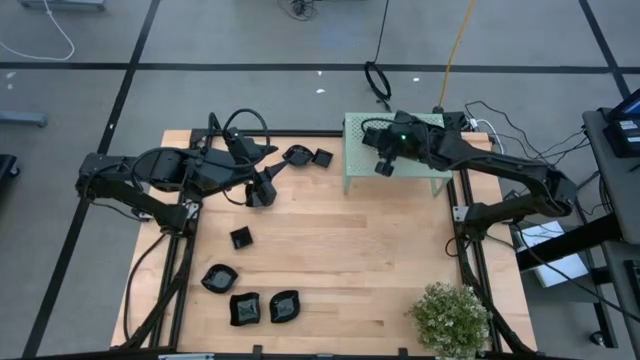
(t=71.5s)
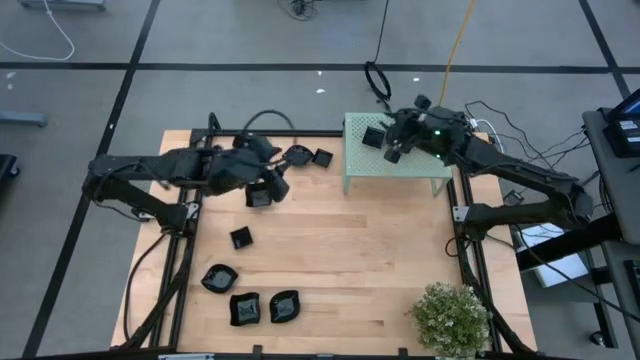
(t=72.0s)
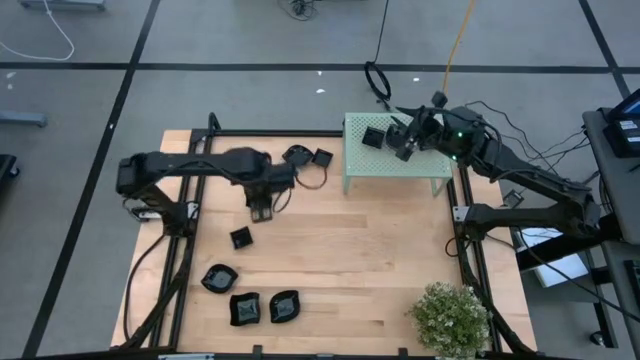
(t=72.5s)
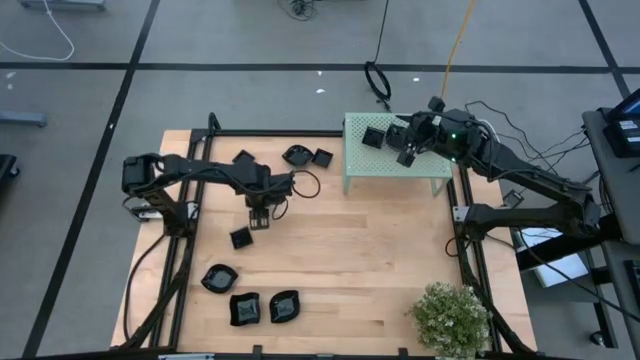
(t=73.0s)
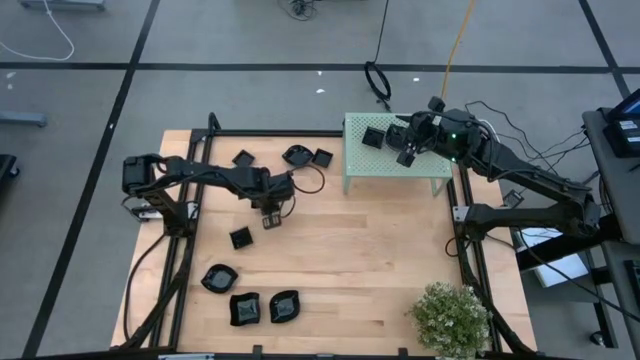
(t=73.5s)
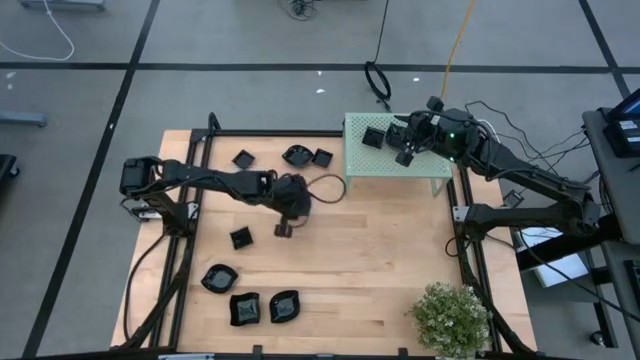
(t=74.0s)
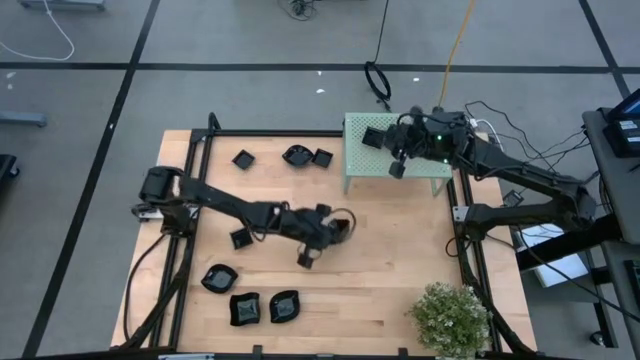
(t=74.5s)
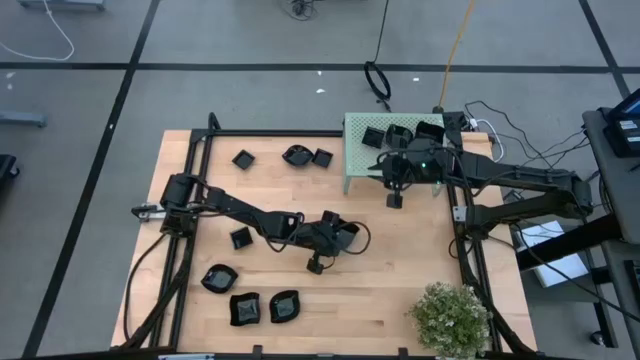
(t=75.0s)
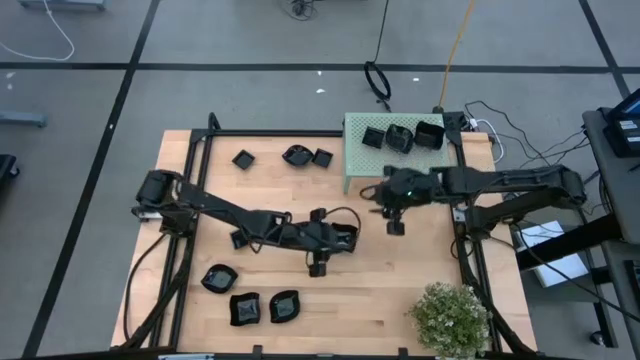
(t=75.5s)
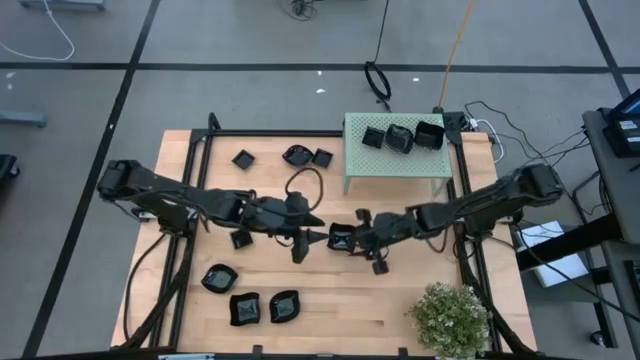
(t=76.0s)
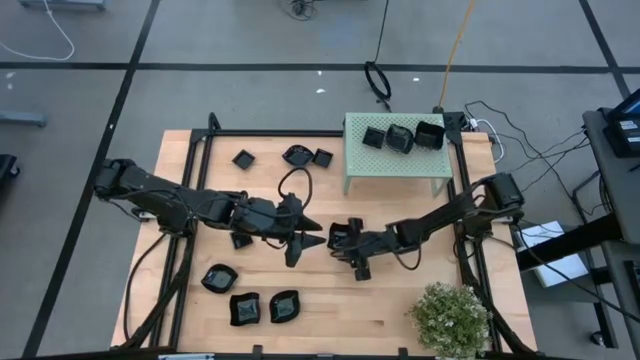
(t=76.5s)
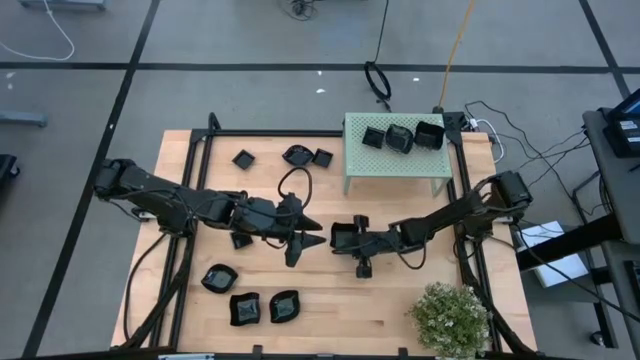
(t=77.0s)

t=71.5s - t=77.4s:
Task: Pick & Place Mini shaped plates
Stack the top distorted square plate on top of the distorted square plate on the shelf

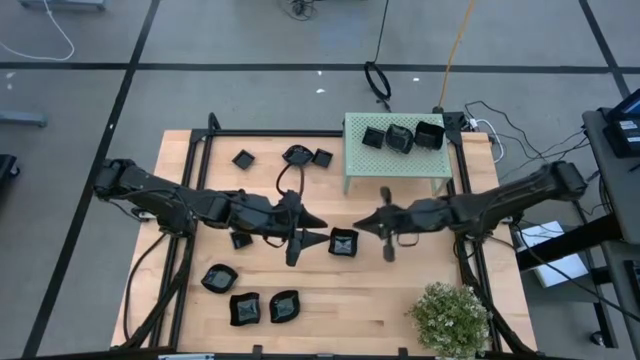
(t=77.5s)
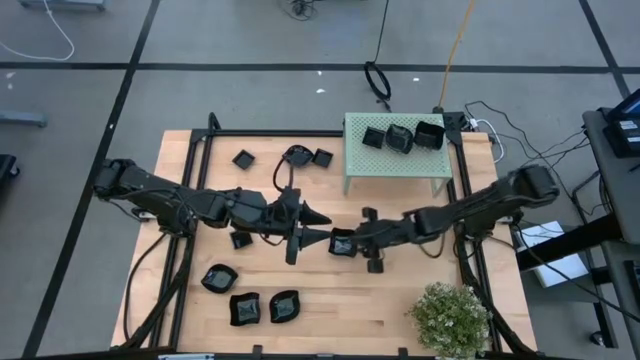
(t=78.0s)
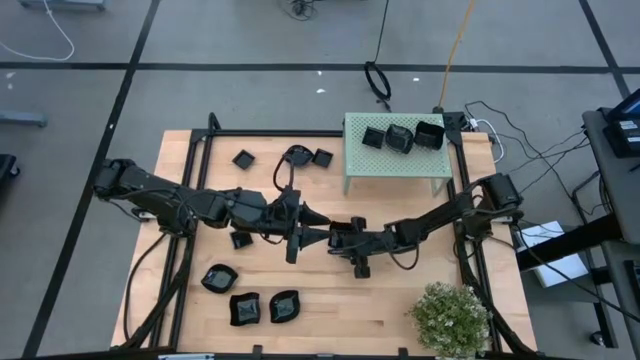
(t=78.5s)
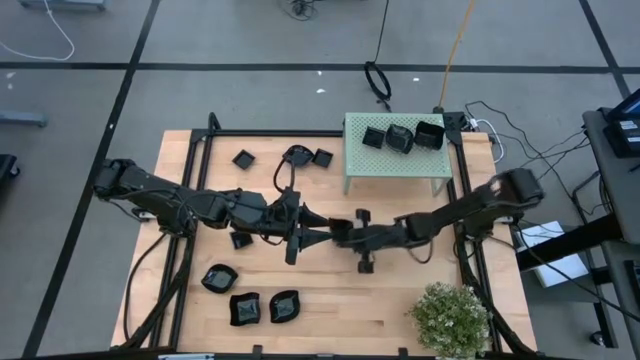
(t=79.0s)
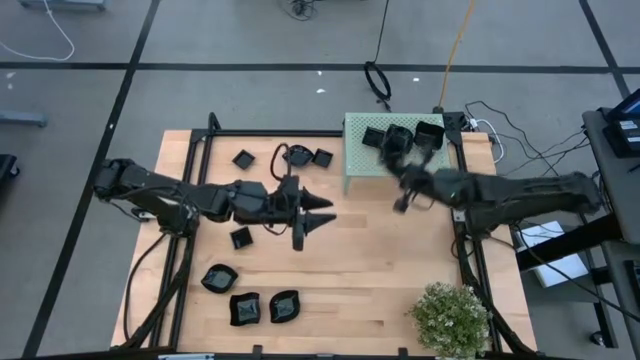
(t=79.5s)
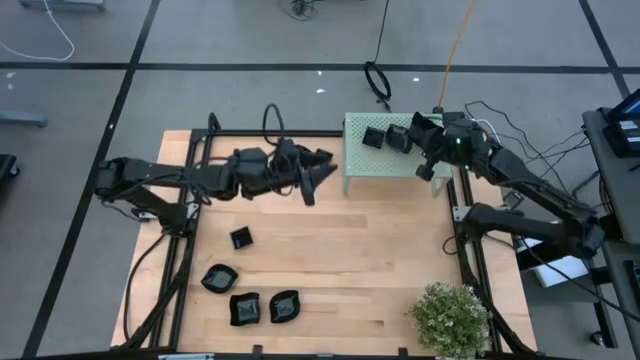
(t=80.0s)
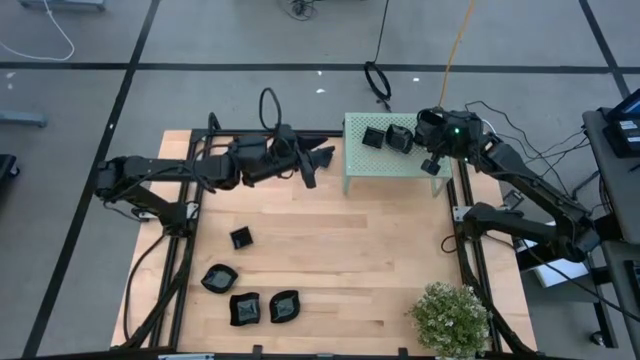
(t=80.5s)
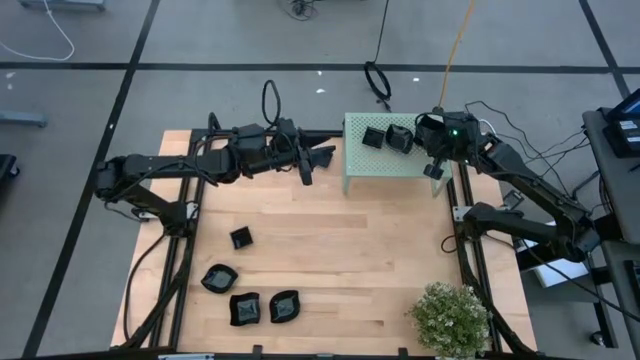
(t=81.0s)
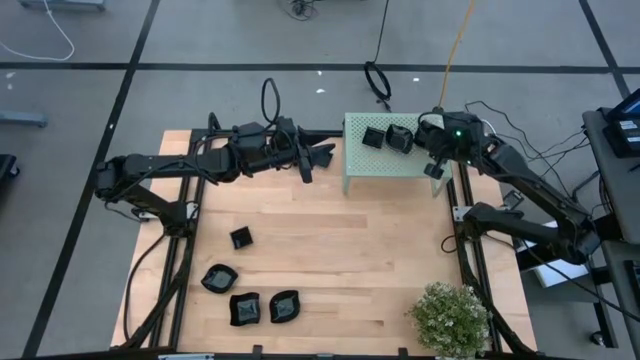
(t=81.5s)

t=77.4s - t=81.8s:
Stack the top distorted square plate on top of the distorted square plate on the shelf

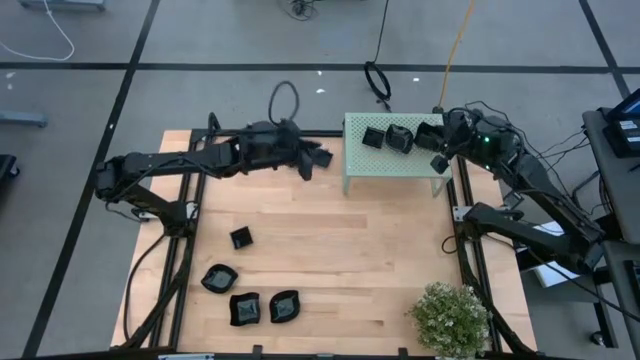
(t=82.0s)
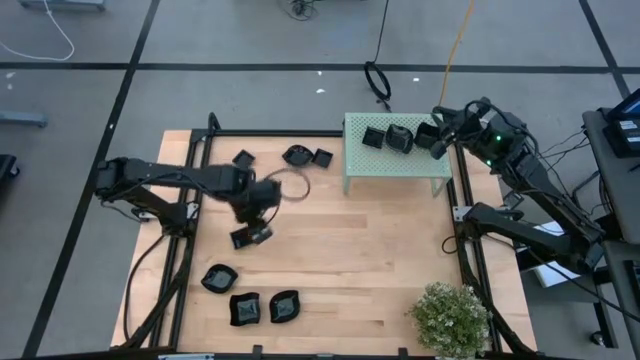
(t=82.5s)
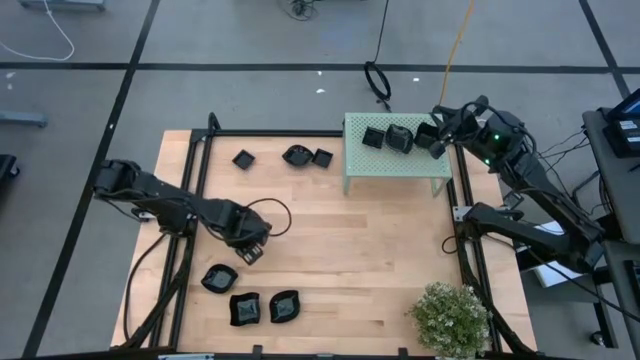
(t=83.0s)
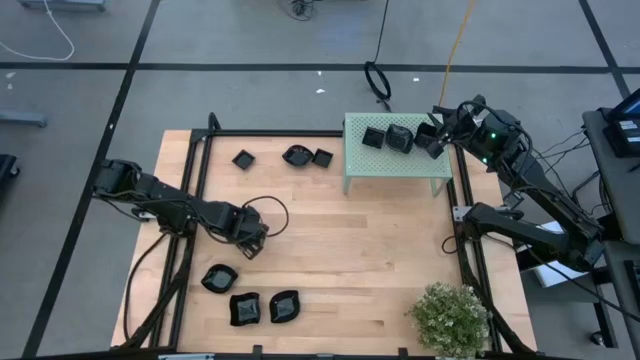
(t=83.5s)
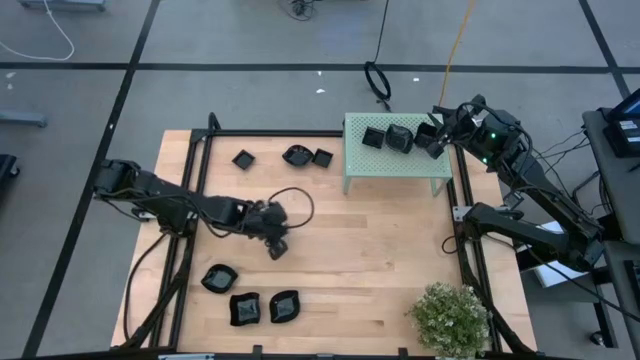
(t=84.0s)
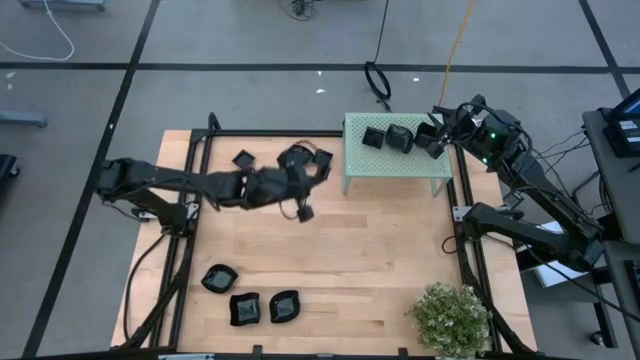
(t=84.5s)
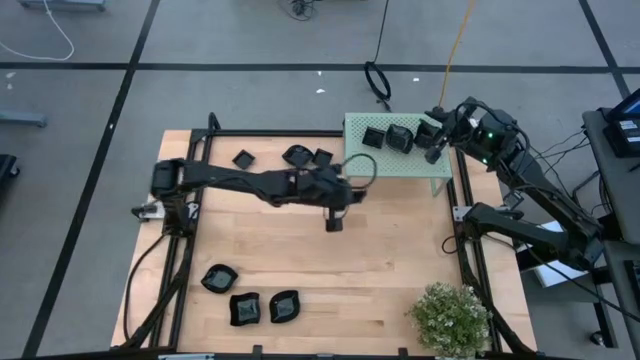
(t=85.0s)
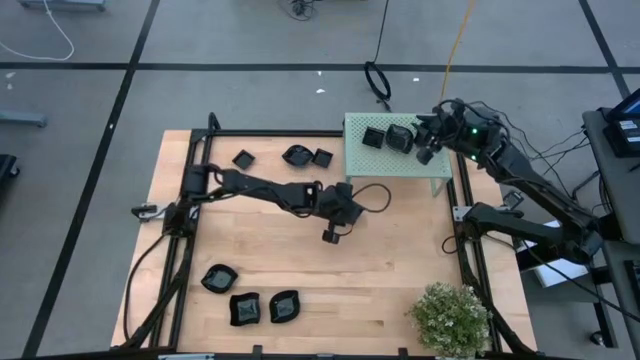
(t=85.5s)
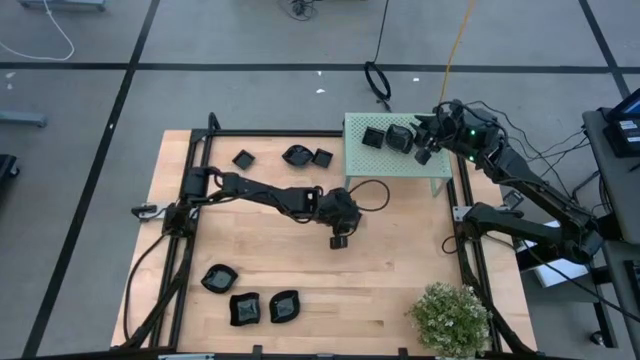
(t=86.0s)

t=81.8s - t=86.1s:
Move the bottom square plate to the center of the table

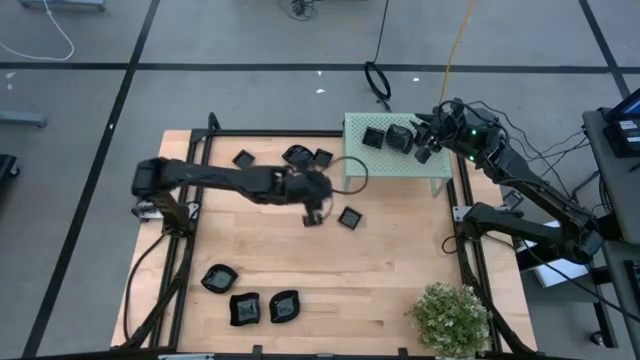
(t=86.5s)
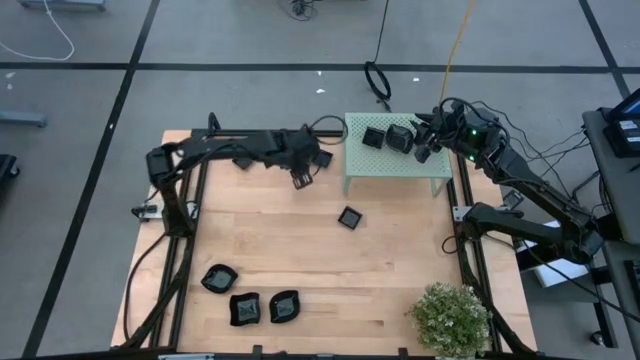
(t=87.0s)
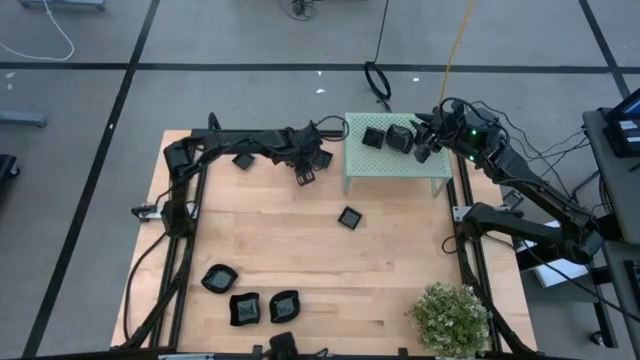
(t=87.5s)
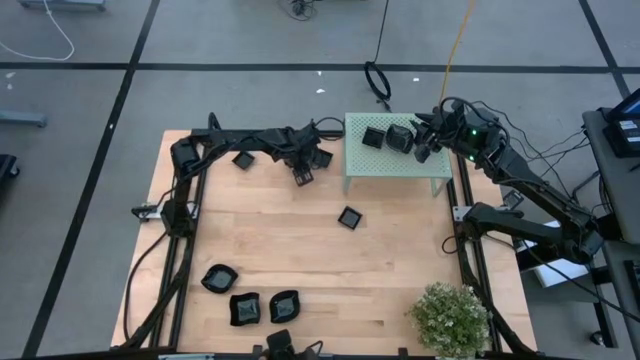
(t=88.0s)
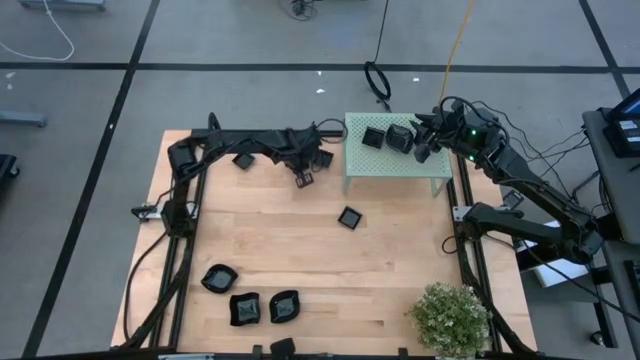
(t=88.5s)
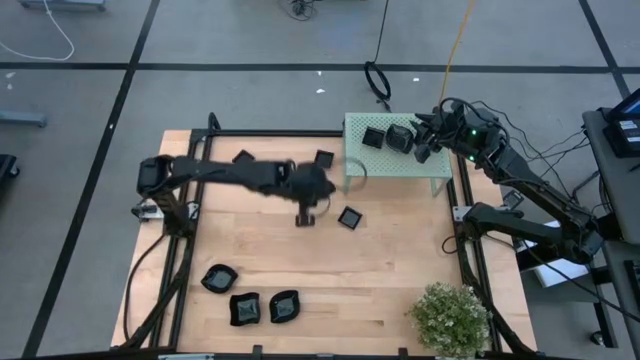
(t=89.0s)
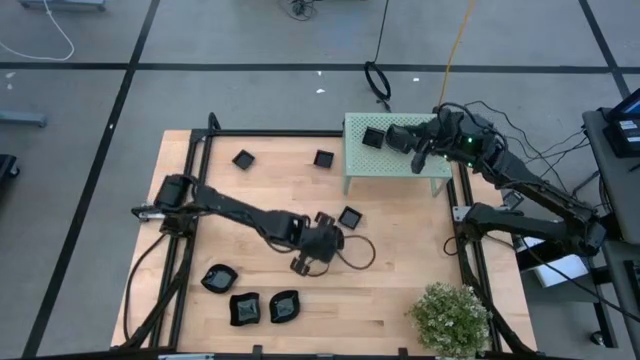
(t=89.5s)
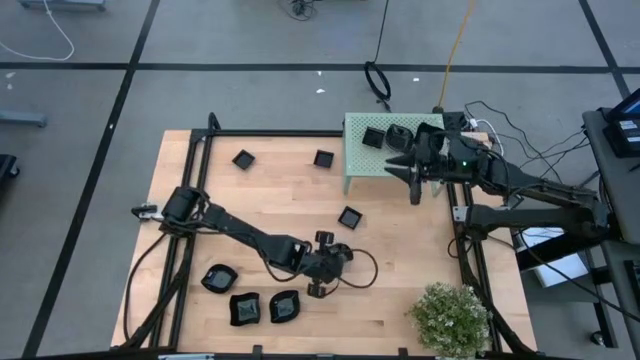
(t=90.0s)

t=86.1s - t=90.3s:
Move the top leaf-shaped plate to the center of the table

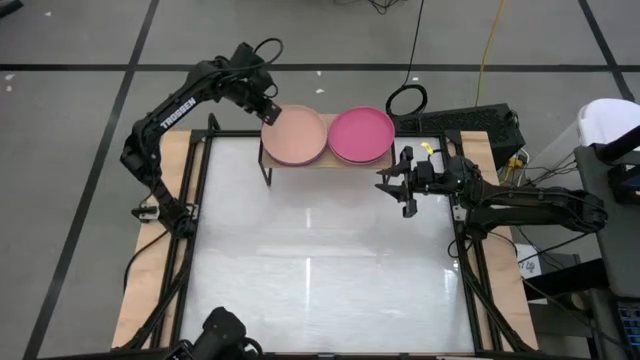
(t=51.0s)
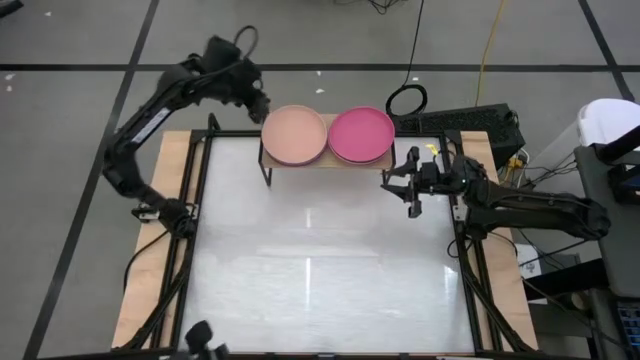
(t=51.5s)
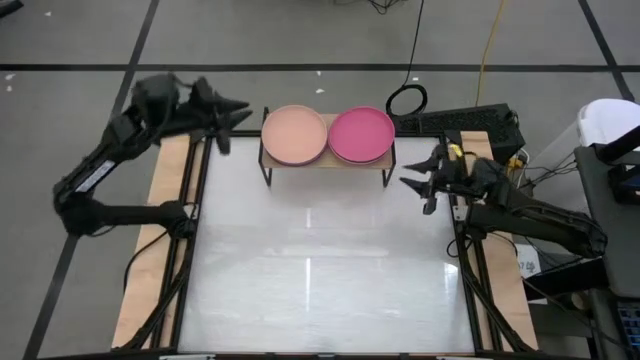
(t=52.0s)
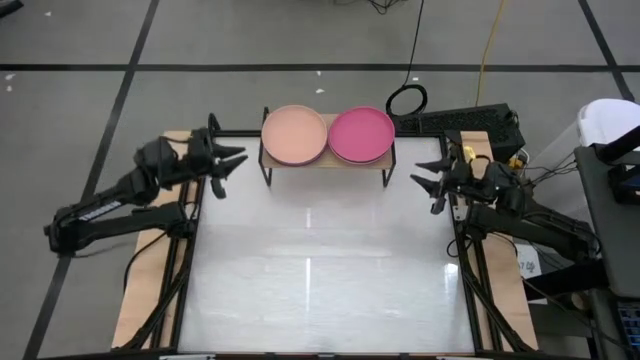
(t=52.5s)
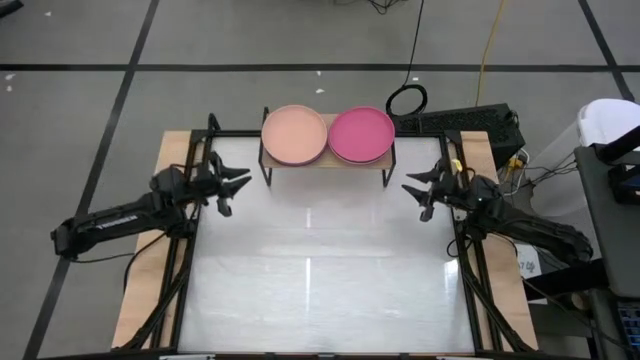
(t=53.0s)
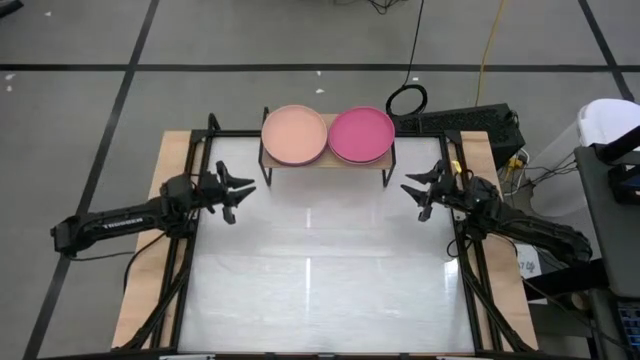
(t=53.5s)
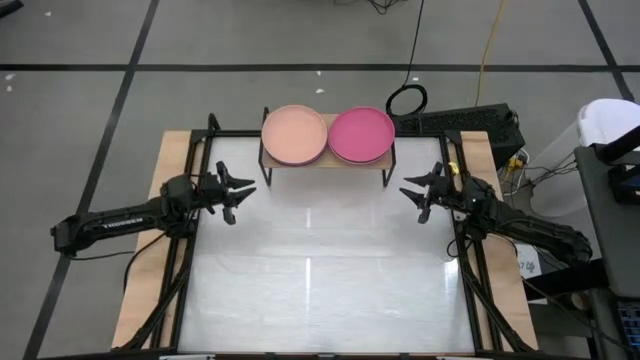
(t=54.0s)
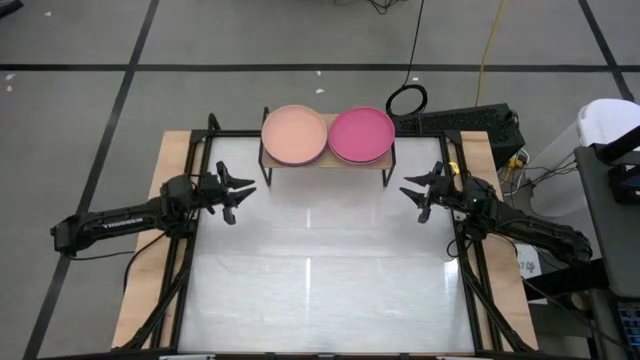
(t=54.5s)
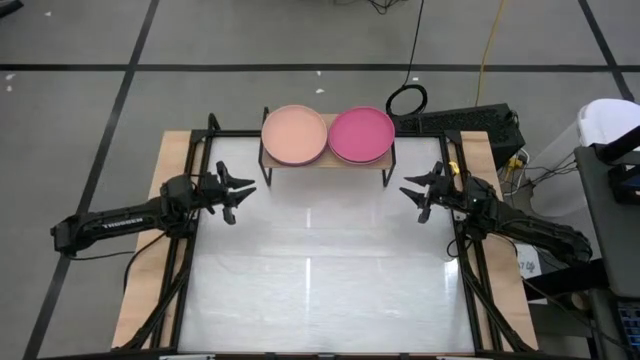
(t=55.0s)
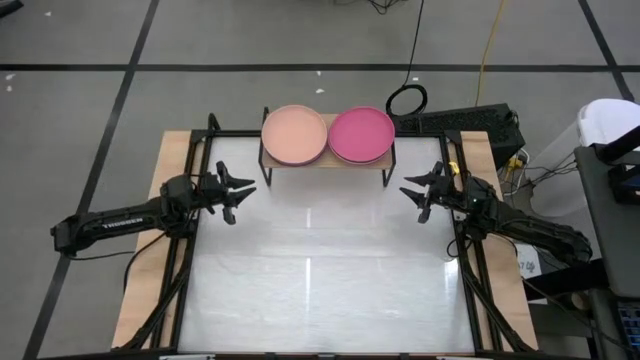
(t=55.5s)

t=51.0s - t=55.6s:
Task: Place and stack plates onto a shelf
Return to Home Position
